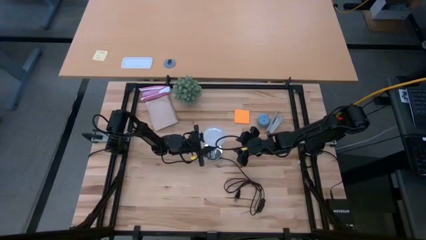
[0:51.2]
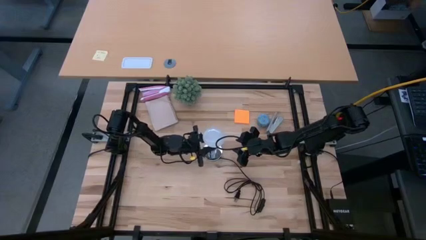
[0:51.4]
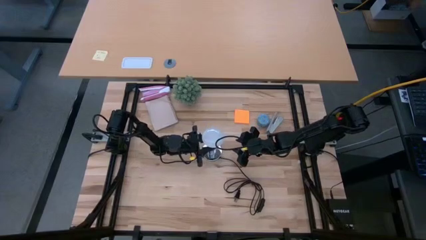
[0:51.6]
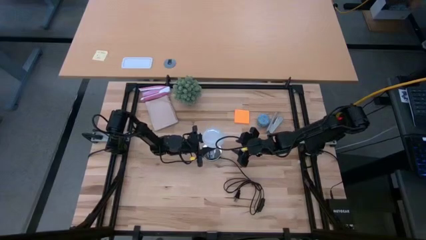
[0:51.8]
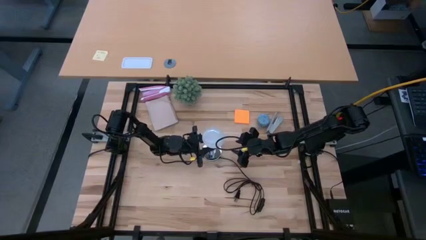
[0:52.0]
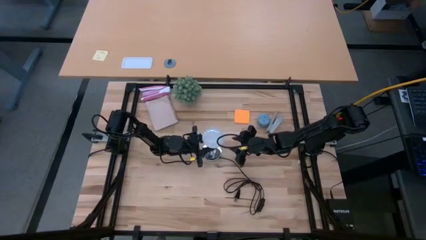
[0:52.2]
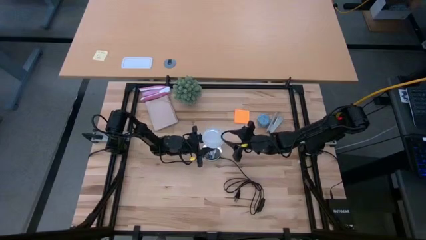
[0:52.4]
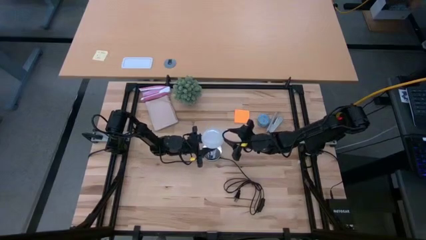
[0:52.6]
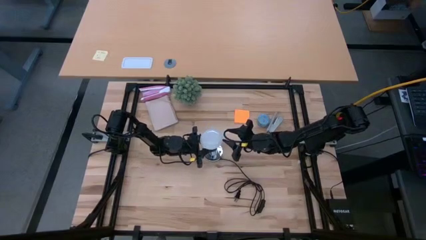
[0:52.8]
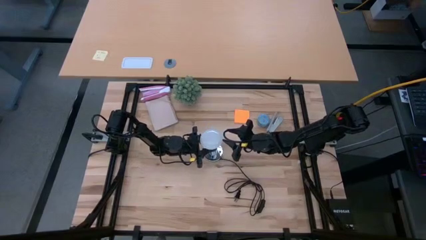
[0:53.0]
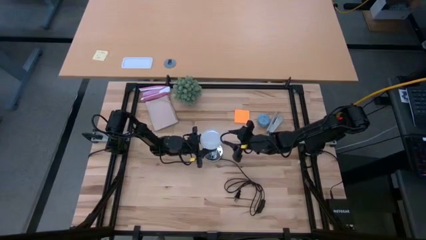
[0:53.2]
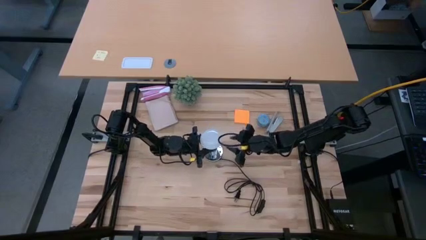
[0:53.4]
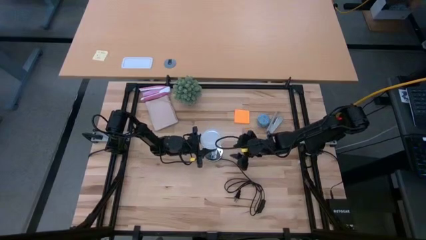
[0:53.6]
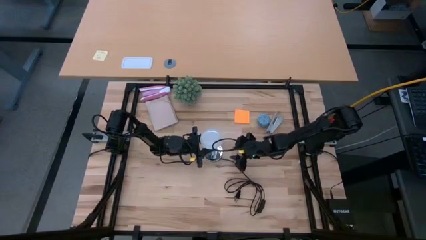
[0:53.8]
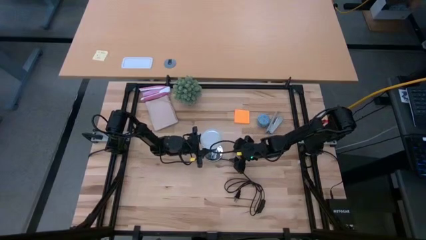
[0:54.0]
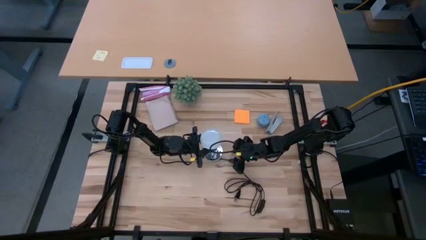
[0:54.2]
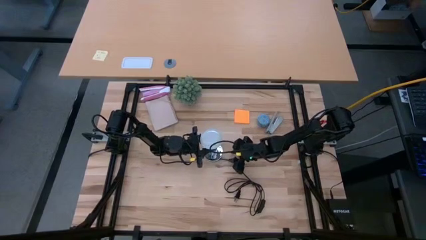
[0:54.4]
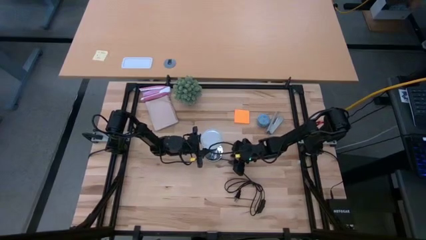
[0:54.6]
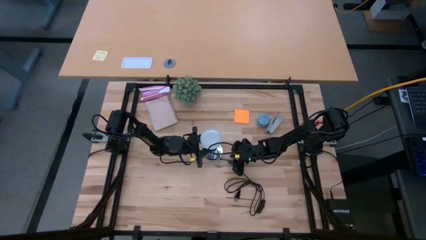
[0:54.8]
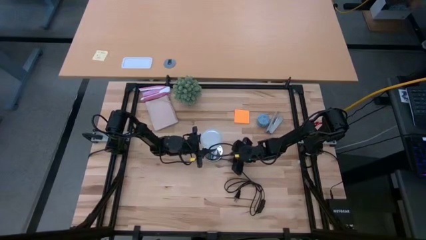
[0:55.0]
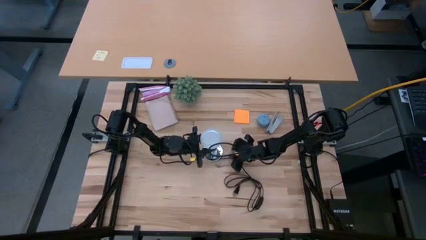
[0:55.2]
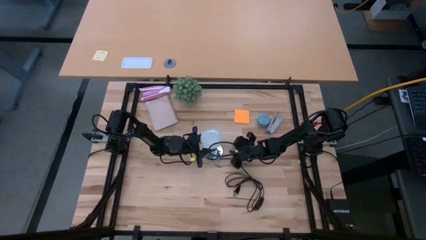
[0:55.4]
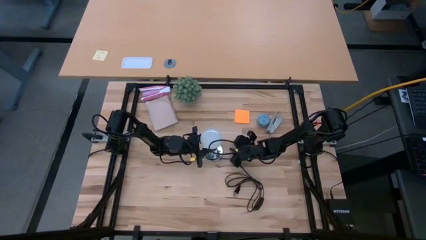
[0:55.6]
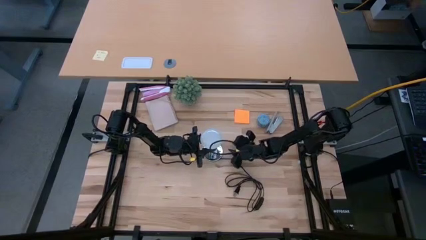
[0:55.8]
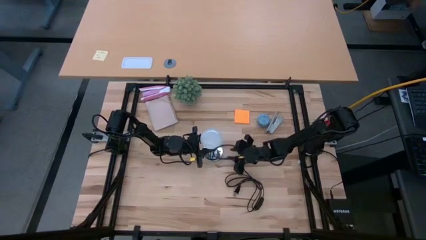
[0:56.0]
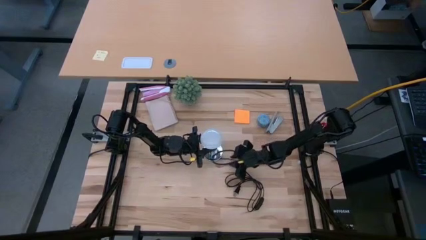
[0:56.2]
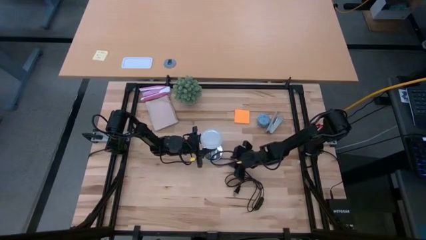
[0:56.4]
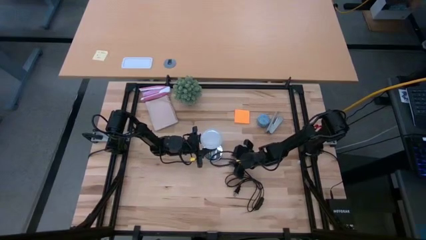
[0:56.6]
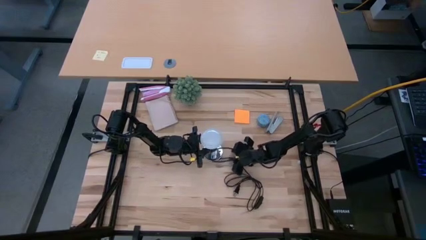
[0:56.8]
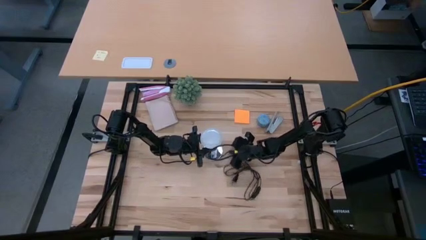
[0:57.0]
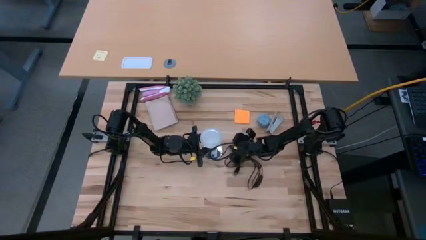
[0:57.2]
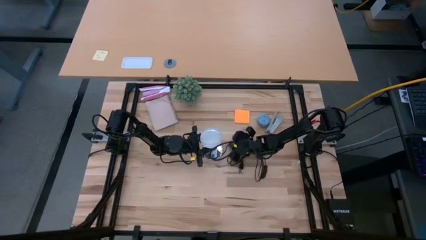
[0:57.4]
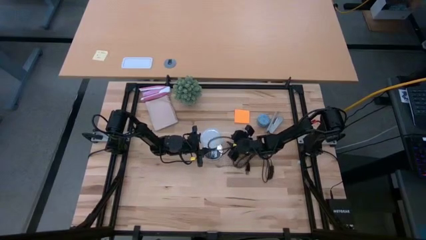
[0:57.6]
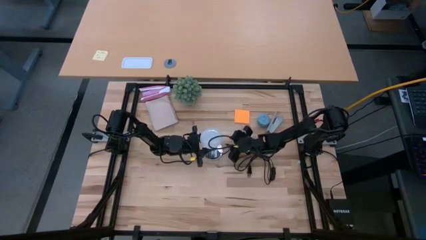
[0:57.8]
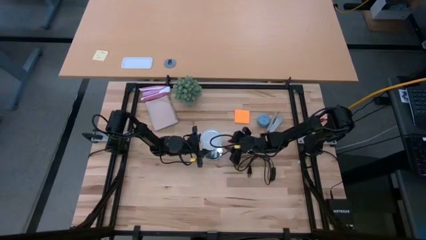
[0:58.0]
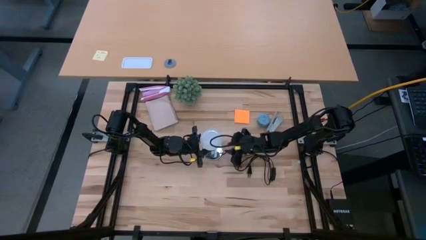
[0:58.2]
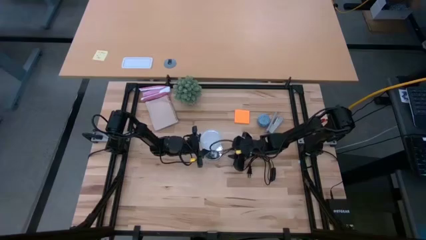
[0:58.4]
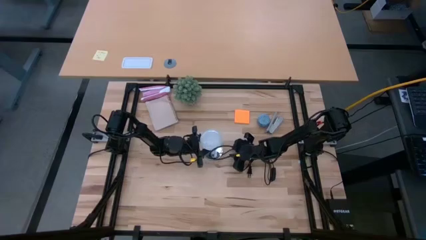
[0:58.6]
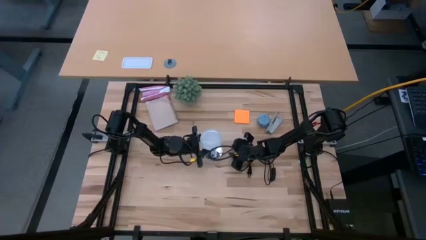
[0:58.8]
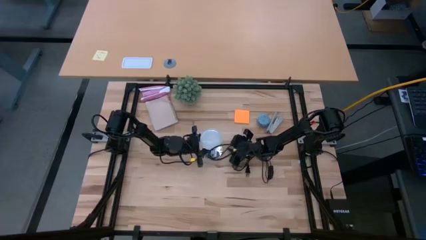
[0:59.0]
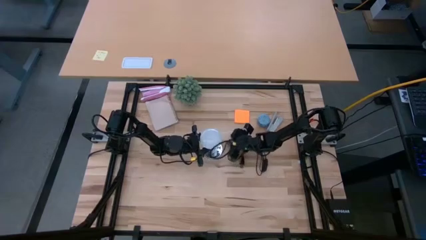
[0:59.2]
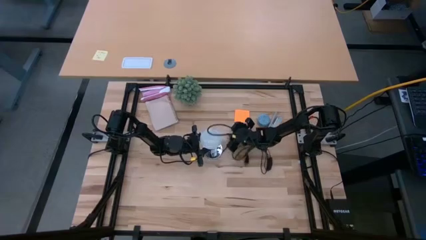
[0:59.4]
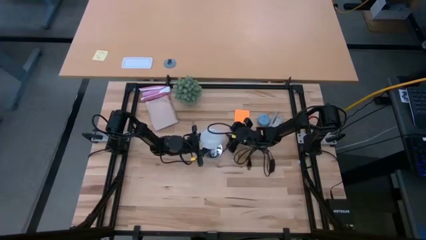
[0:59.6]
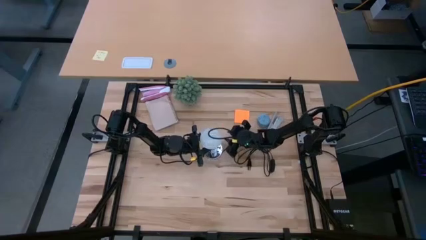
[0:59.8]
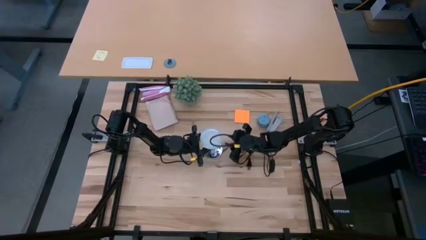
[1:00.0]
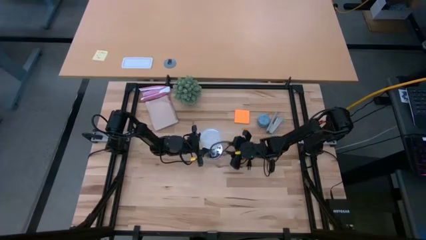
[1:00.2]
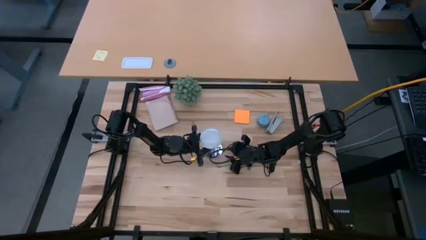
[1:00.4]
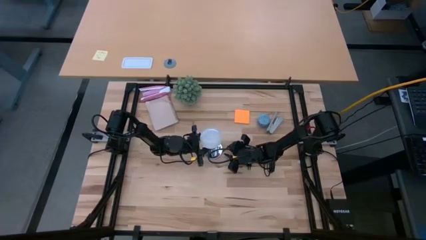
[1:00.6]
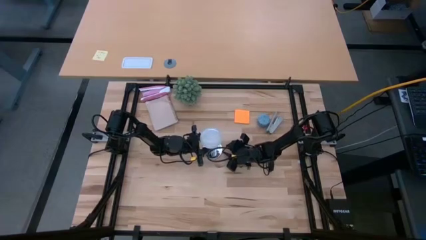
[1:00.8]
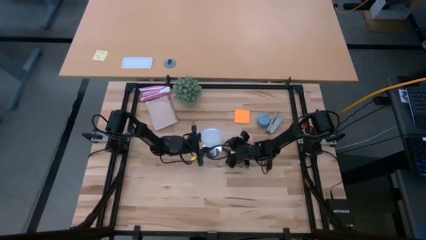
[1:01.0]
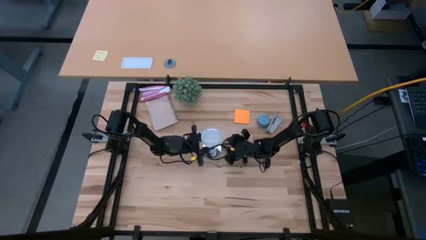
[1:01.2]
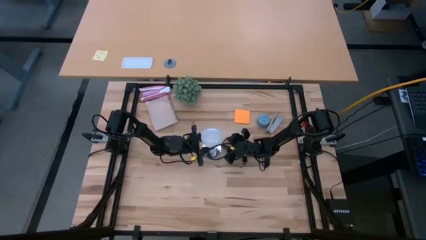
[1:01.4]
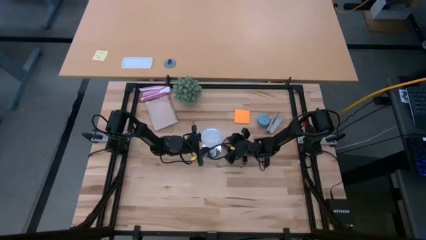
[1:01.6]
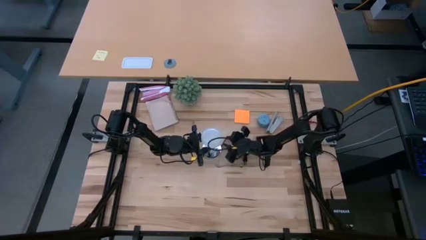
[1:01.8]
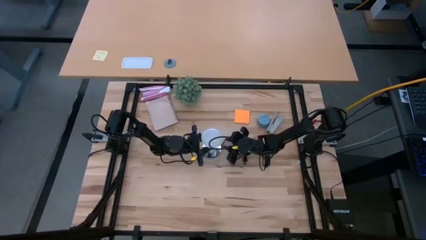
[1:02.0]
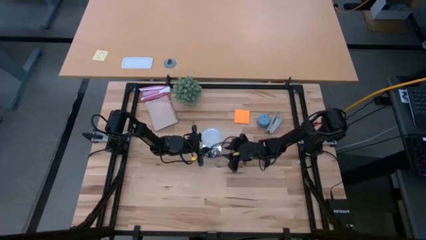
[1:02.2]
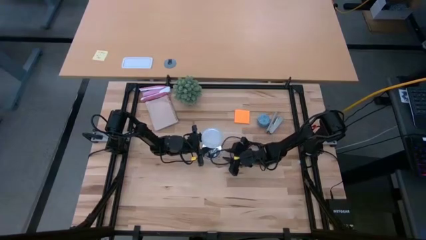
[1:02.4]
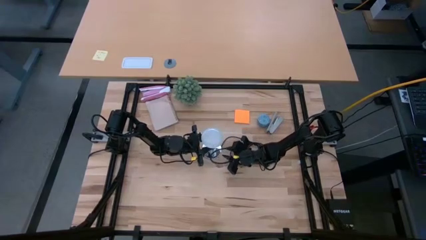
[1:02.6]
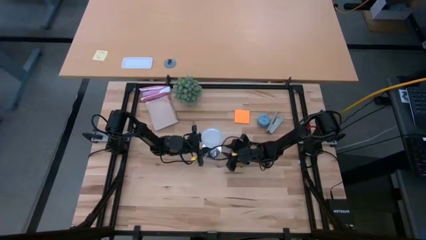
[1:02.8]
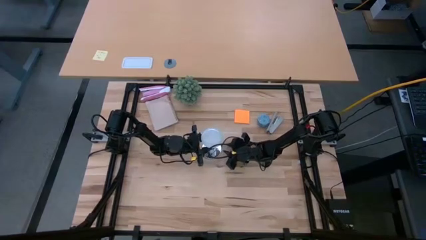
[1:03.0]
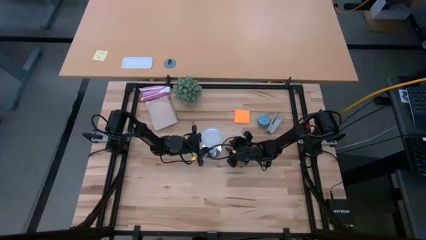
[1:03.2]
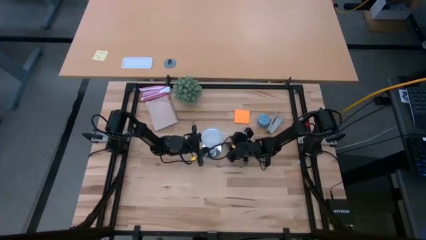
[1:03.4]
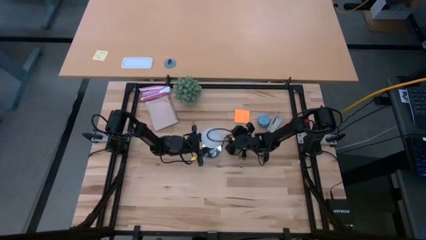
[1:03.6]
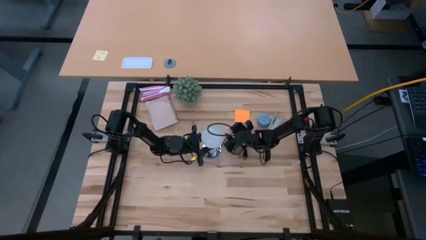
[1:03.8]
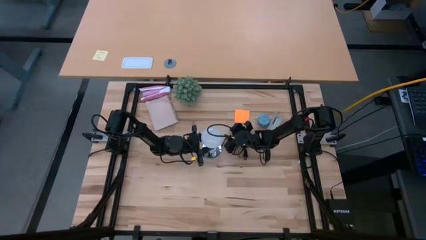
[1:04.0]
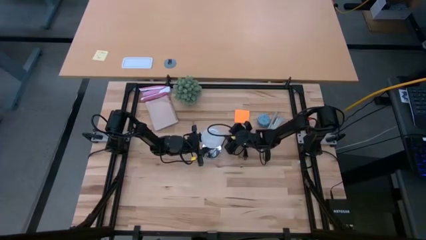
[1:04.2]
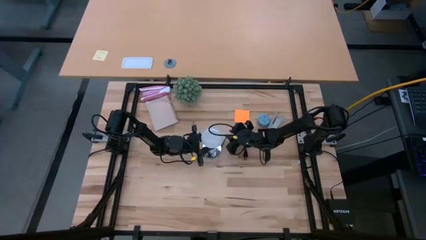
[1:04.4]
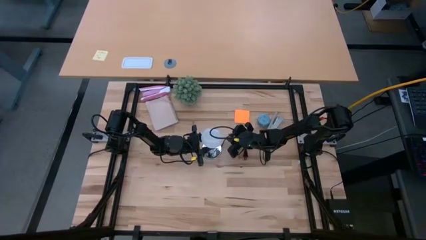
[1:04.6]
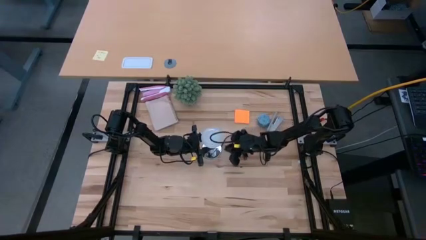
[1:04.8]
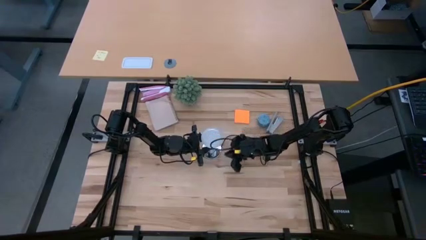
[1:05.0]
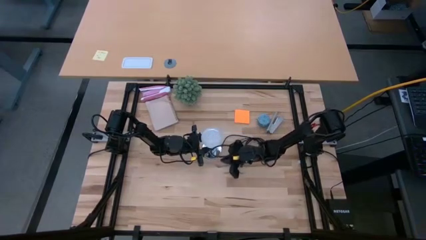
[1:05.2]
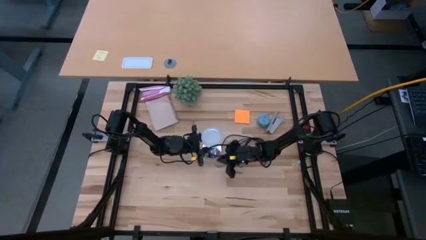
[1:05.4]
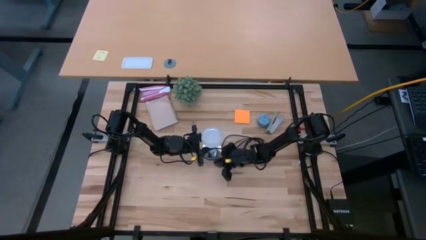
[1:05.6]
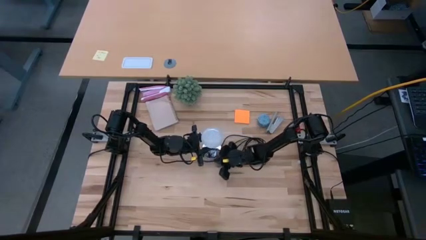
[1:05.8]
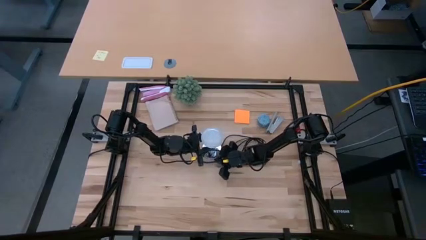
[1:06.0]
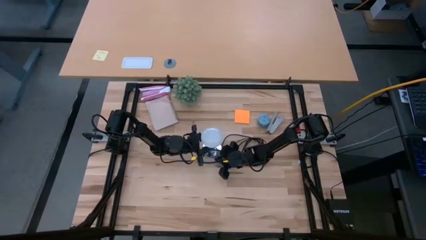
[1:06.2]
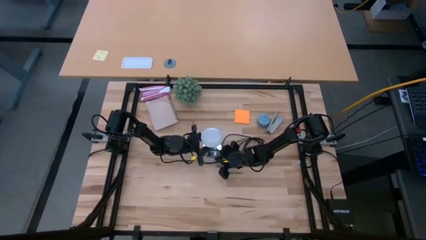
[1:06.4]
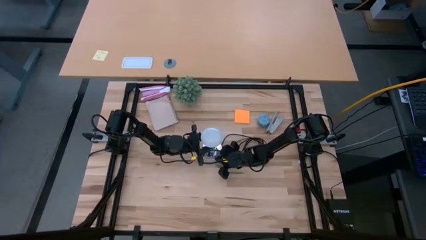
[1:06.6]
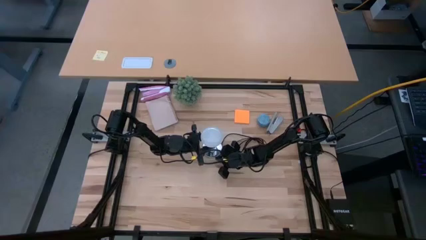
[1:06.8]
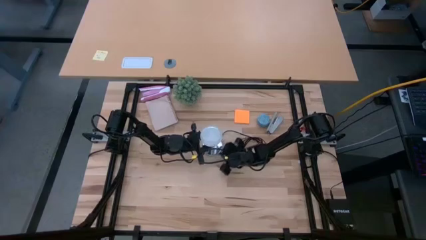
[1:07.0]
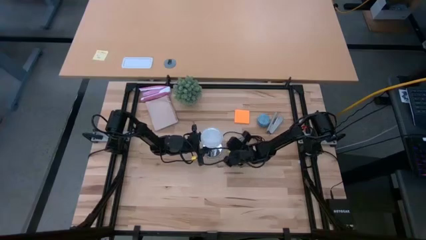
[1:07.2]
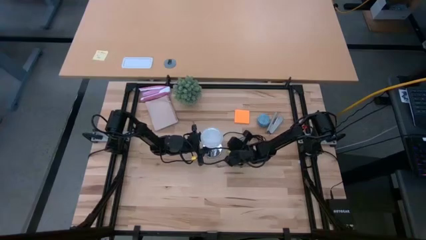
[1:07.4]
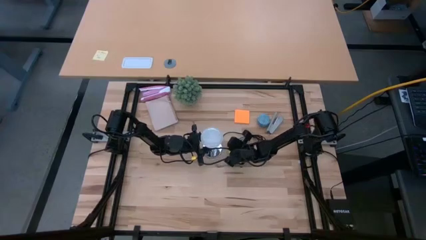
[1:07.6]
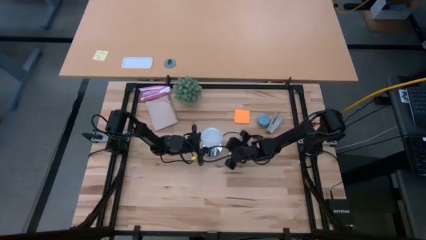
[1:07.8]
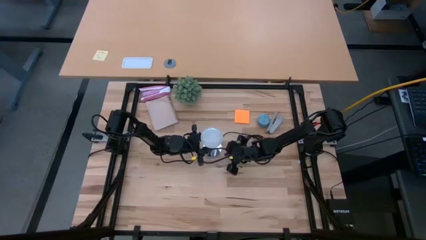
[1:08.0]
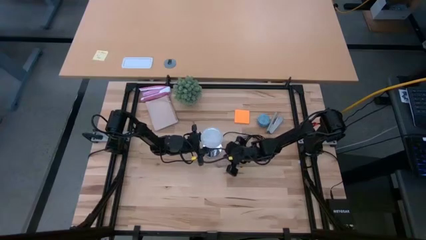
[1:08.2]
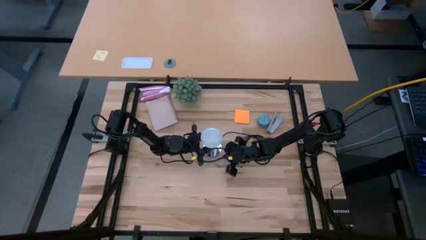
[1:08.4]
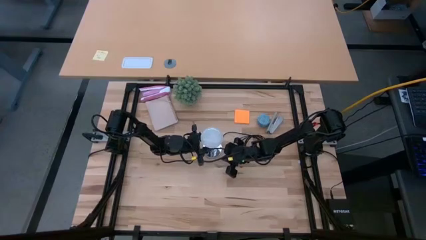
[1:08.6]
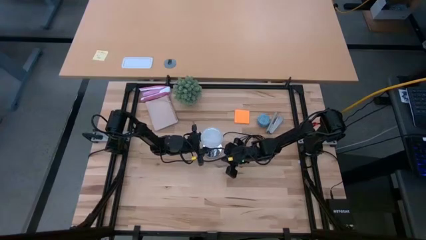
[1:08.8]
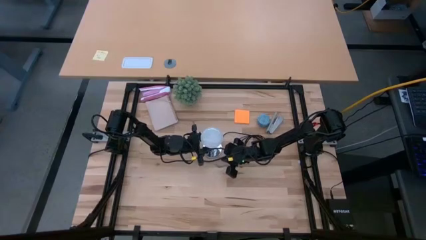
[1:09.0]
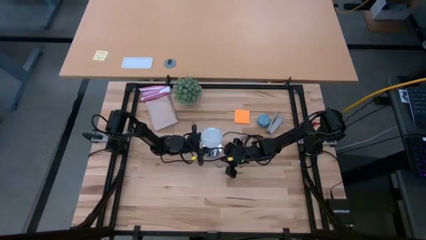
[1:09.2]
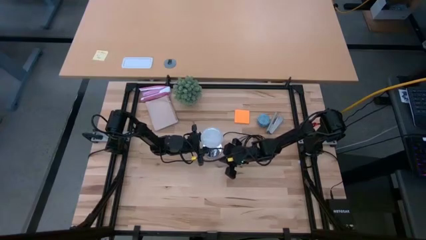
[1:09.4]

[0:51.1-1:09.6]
Task: Screw lightbulb
Insert the white lightbulb into the silver lamp
